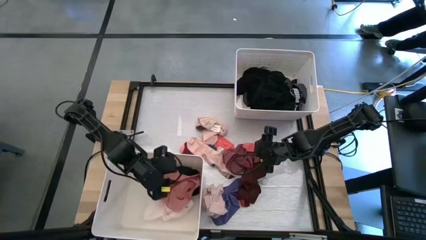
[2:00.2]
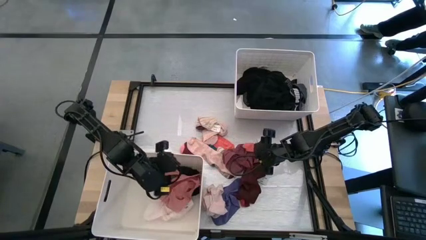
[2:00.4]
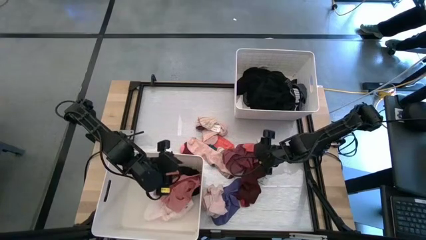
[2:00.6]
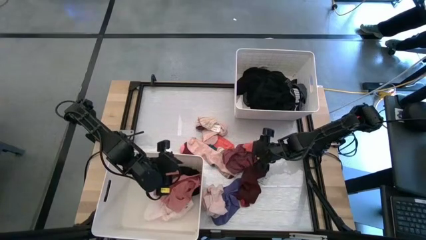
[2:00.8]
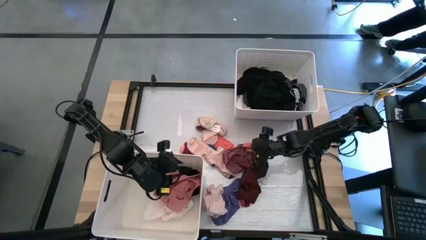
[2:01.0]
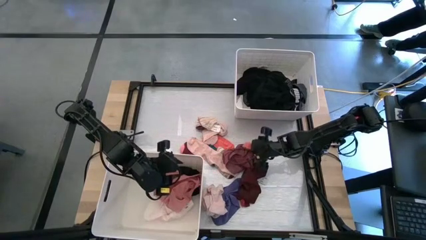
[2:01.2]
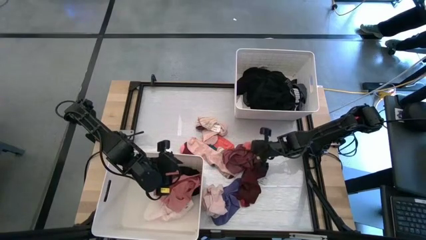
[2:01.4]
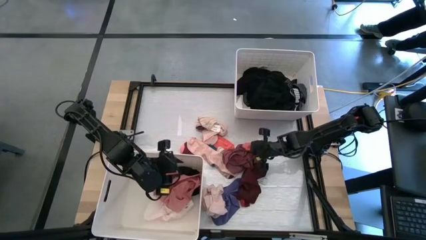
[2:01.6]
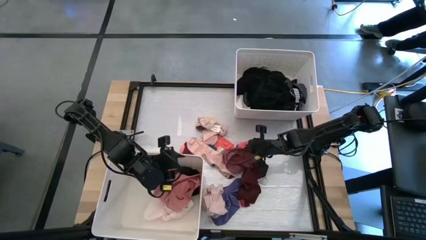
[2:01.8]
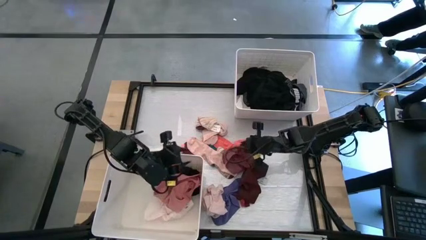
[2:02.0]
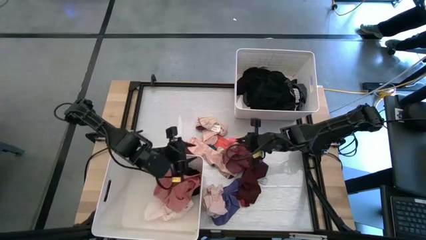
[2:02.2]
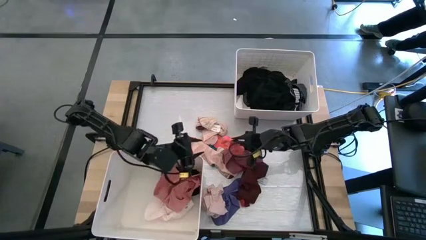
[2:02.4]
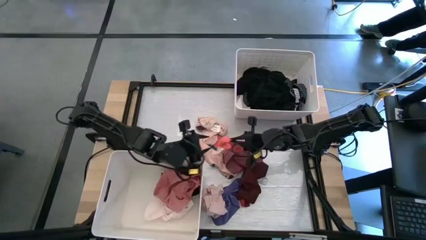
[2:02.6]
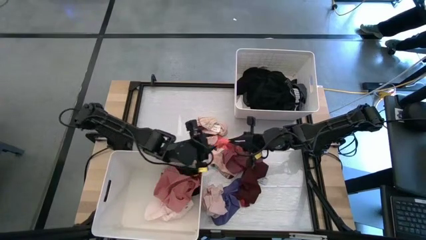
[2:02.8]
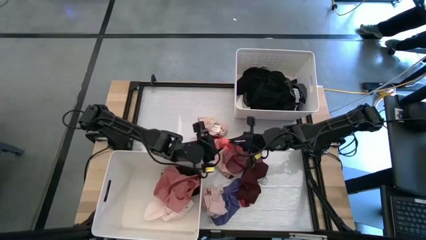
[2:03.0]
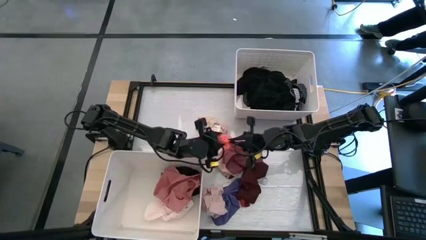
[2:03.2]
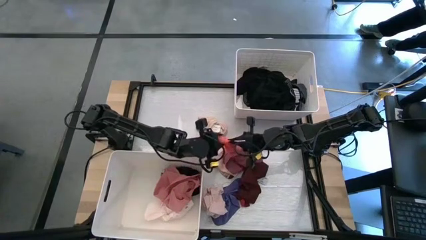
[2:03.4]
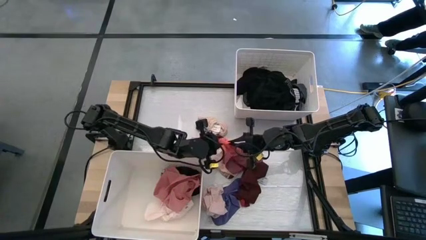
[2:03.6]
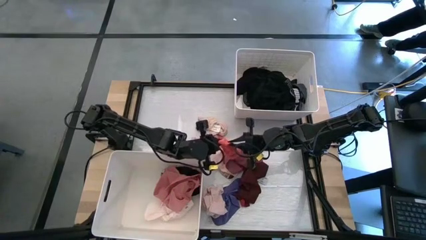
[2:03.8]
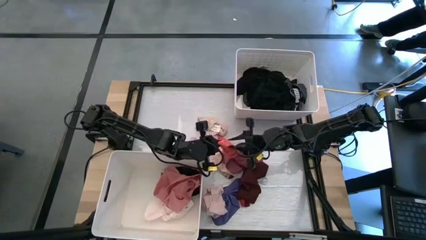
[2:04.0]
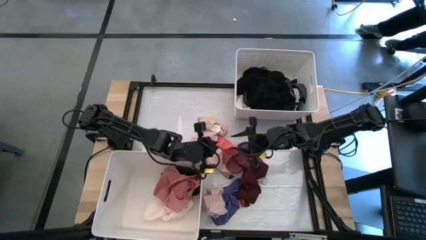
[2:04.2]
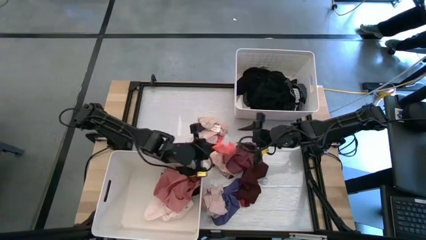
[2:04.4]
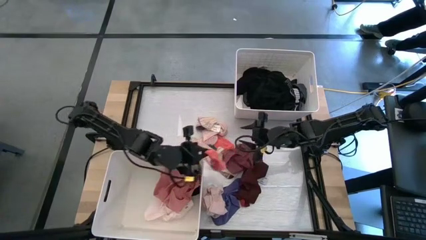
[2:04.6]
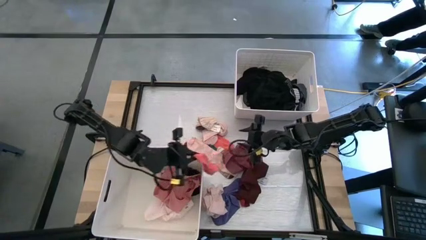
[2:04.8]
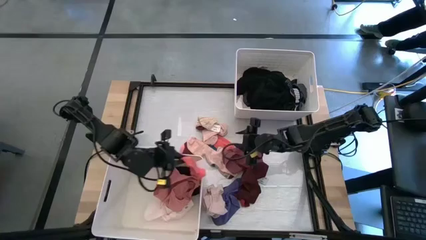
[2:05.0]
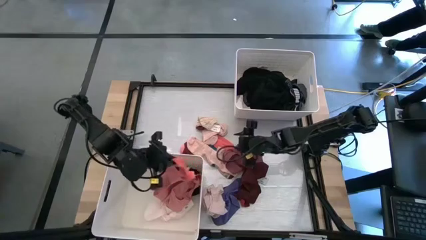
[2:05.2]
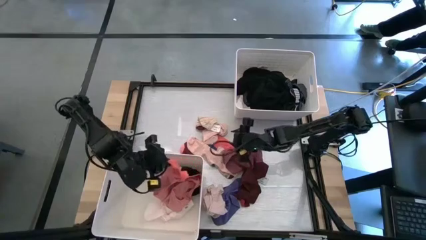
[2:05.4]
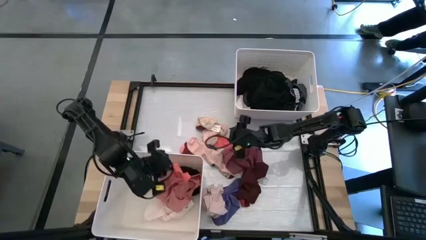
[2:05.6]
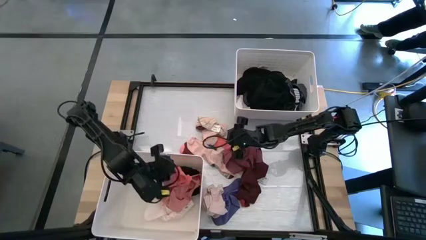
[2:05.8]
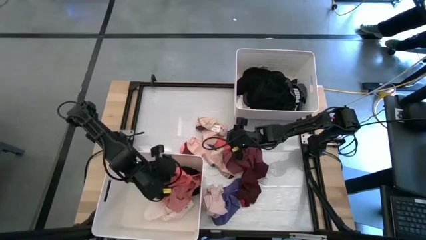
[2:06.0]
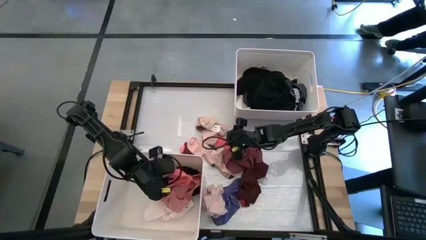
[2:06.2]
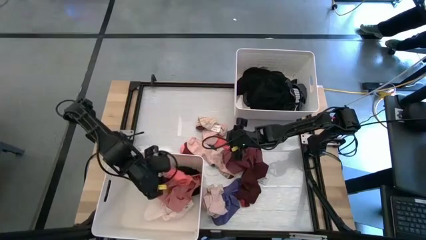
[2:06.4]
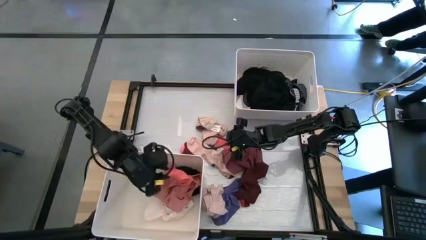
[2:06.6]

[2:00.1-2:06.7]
Task: Sort clothes
Put the orange sock into the bottom white laundry bin

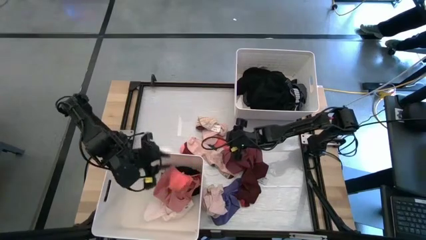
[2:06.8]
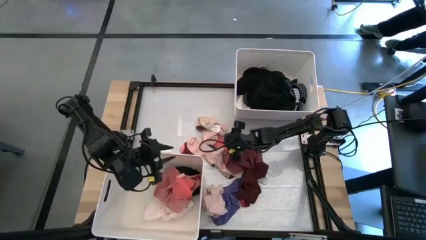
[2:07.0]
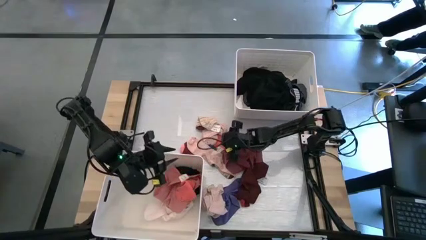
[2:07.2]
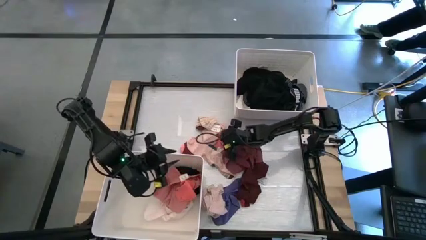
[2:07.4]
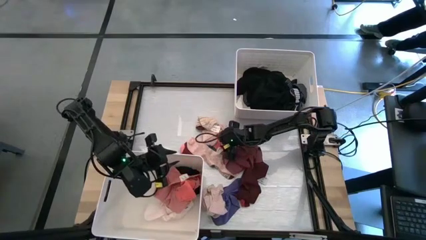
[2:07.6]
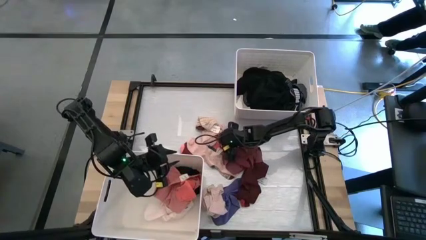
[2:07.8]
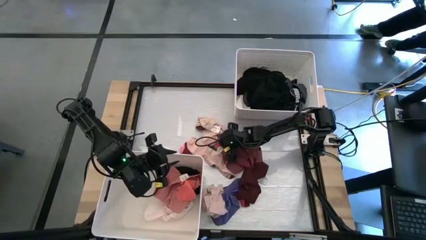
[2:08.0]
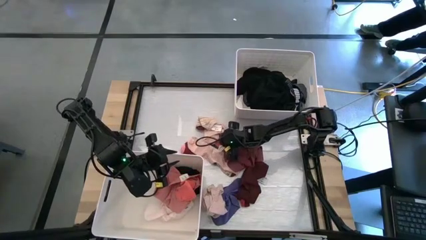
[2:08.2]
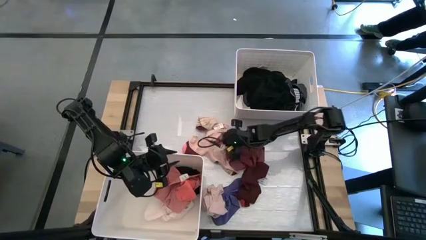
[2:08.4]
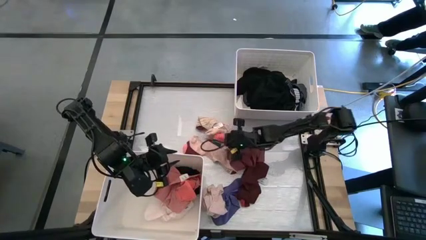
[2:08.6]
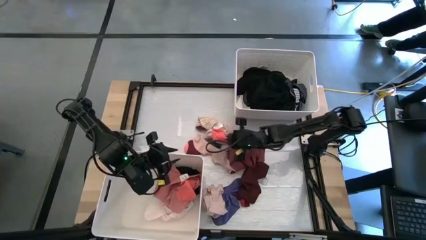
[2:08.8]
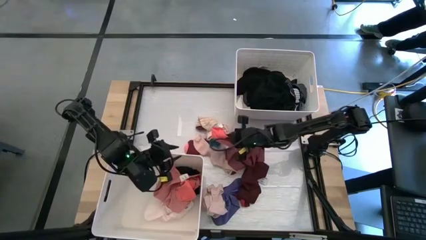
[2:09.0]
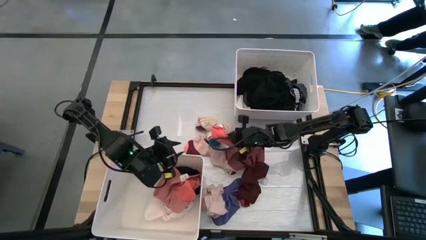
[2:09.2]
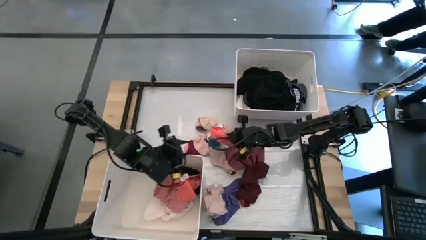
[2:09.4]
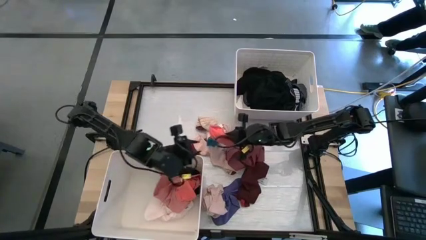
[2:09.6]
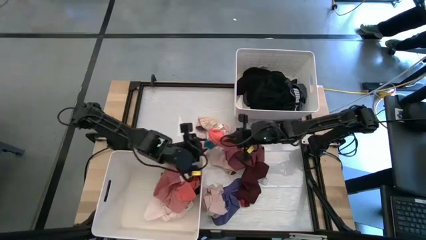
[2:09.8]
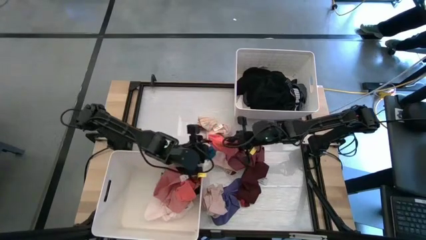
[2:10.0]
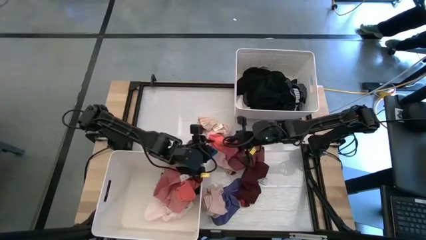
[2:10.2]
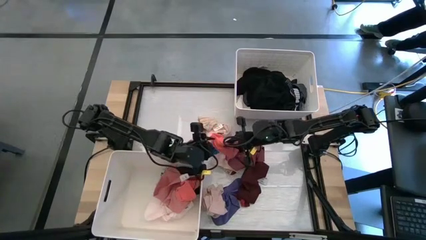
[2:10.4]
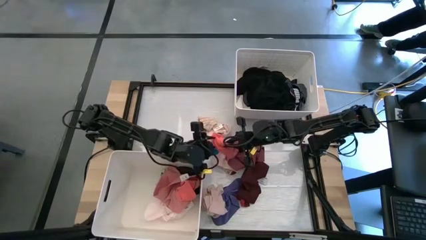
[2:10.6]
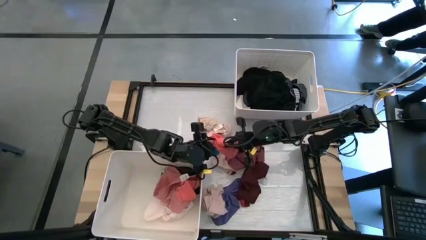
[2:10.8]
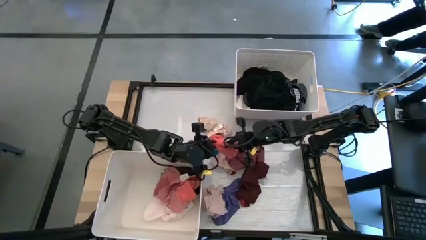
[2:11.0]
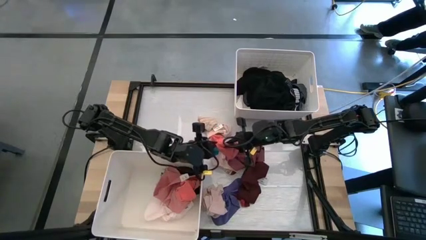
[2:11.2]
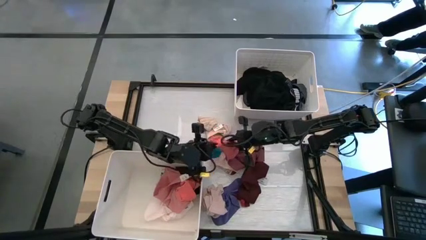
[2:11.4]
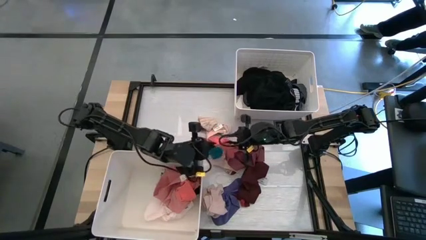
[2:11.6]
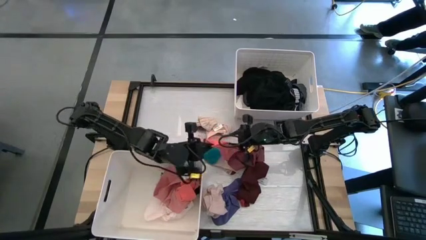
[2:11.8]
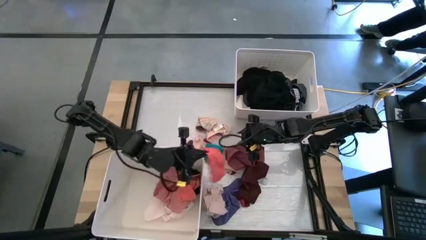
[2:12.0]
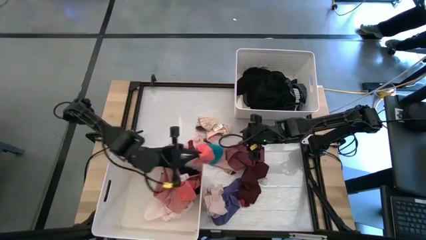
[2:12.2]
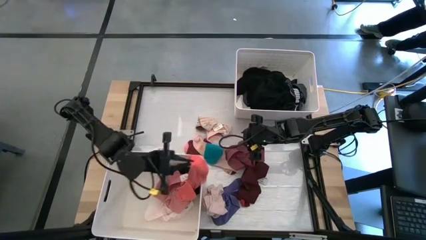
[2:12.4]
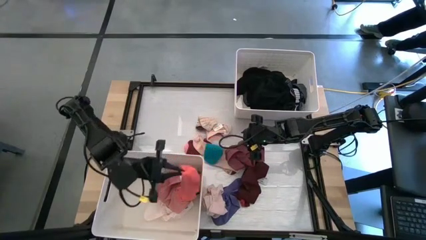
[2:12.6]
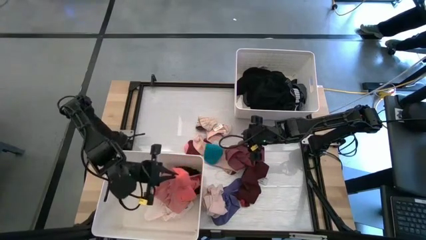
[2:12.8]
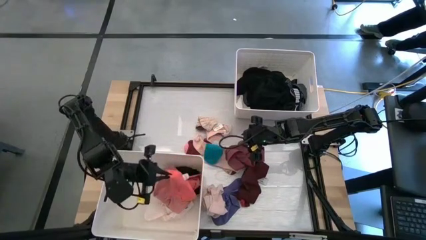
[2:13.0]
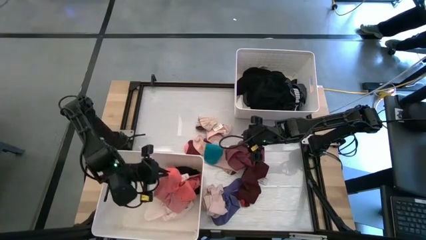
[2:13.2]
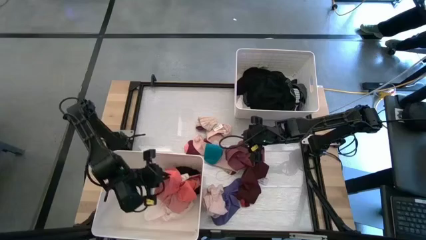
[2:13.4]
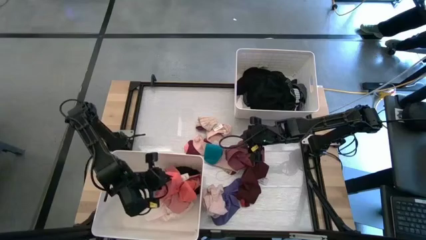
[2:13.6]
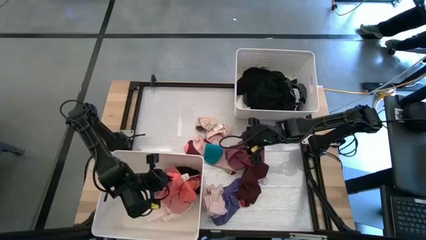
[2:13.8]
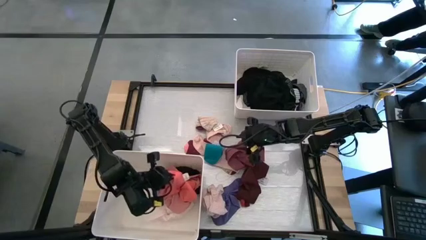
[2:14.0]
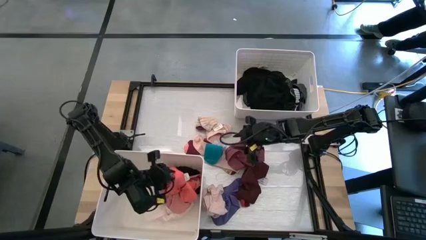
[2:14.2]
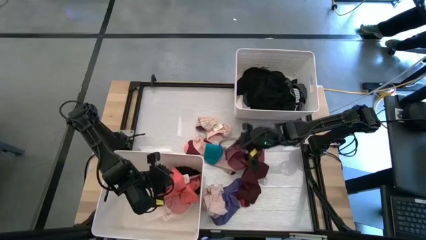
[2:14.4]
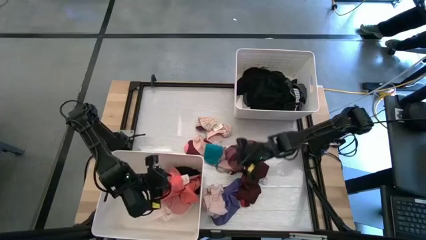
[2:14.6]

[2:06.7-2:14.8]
Put the orange sock into the bottom white laundry bin

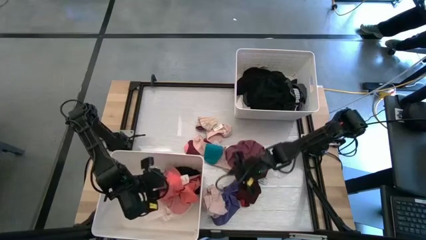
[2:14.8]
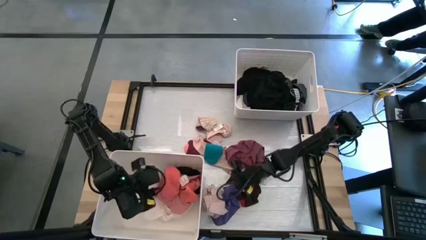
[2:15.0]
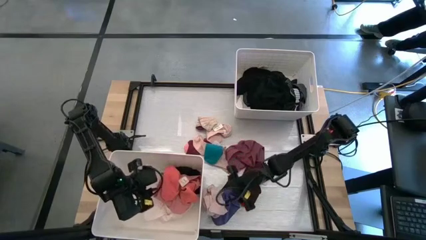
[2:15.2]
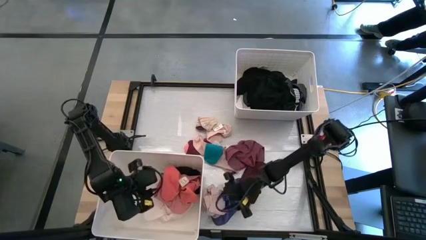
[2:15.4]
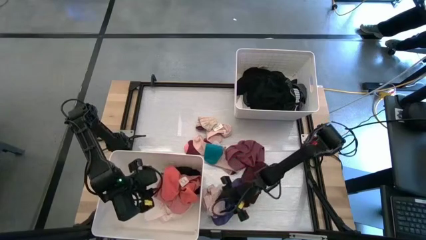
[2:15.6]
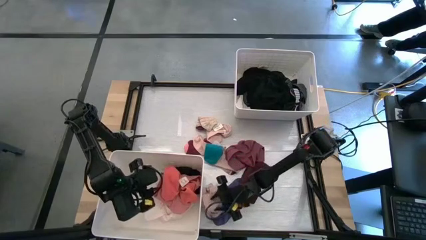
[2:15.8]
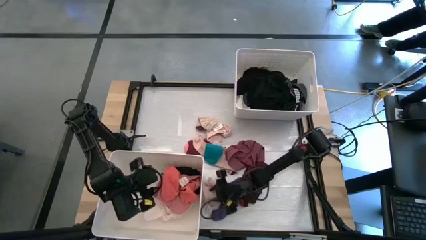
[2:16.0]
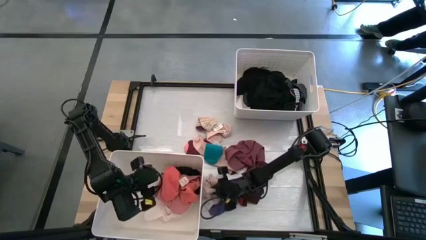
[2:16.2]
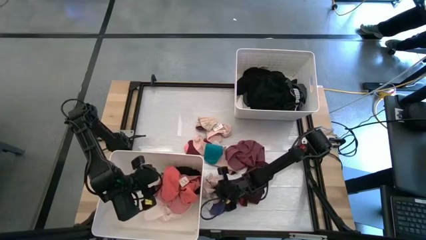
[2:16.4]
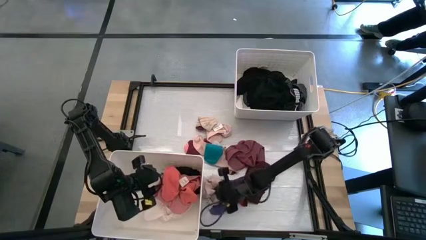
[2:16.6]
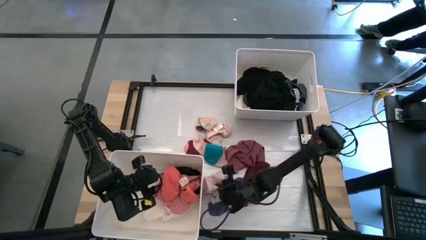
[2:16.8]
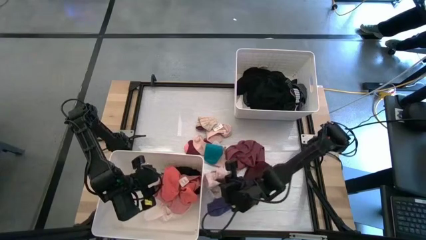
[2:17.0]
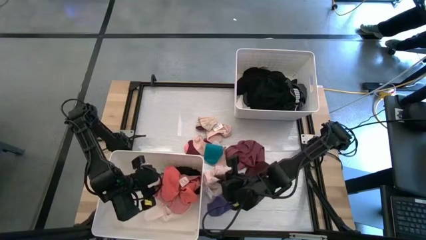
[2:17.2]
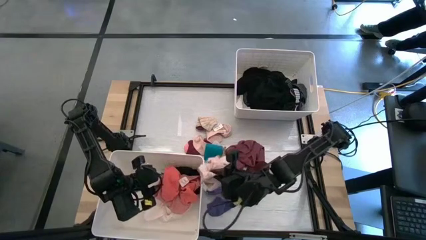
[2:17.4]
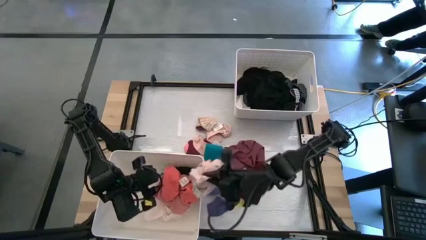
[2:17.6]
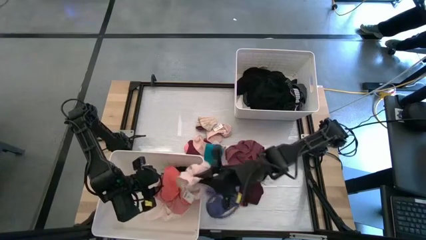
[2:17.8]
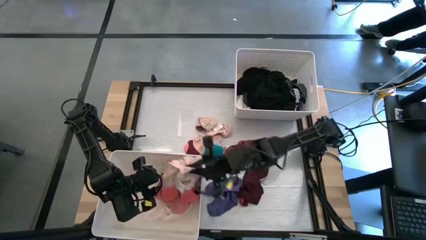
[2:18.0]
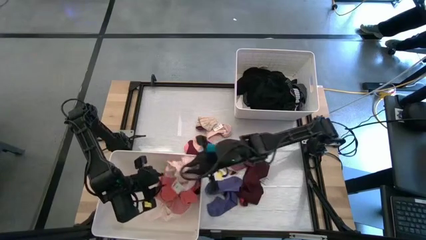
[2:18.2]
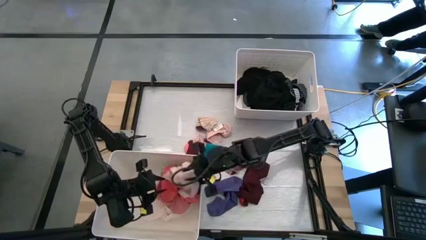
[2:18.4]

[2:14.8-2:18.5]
Put the pink underwear into the bottom white laundry bin
